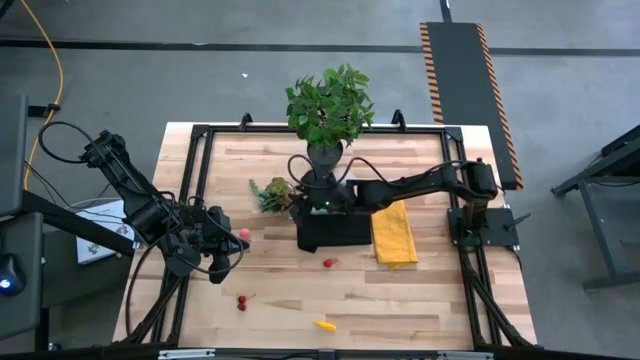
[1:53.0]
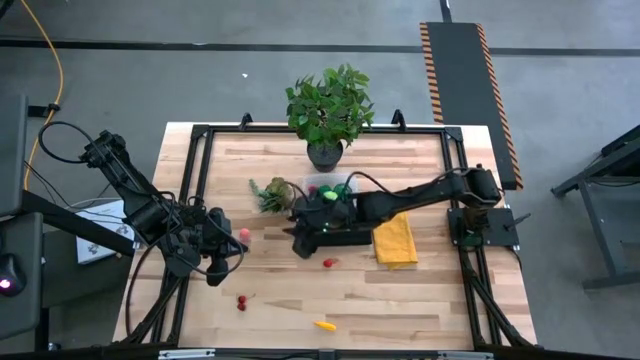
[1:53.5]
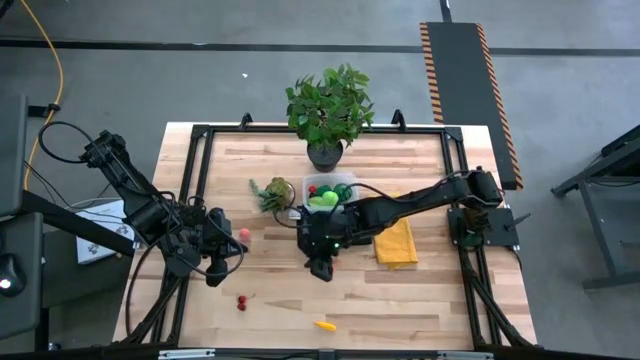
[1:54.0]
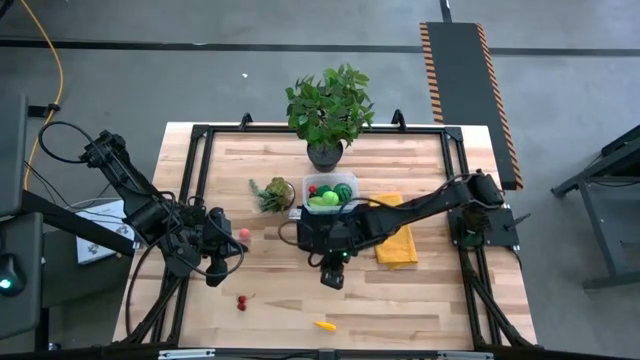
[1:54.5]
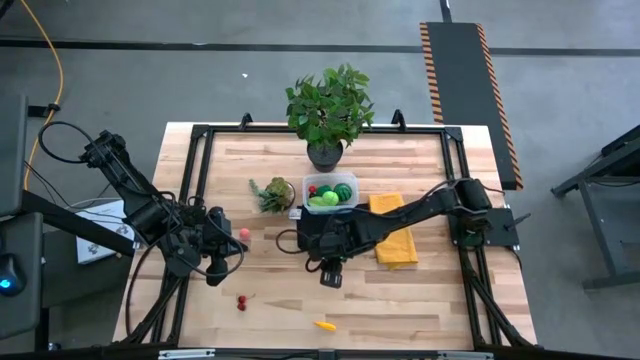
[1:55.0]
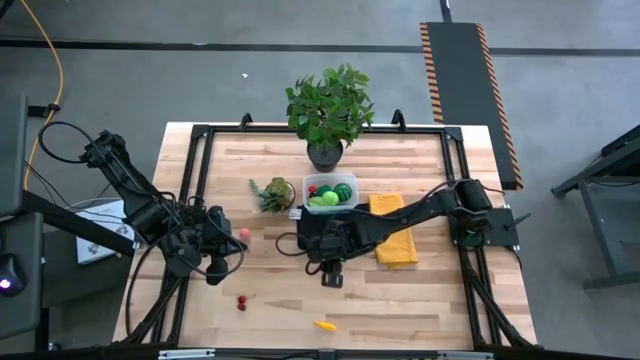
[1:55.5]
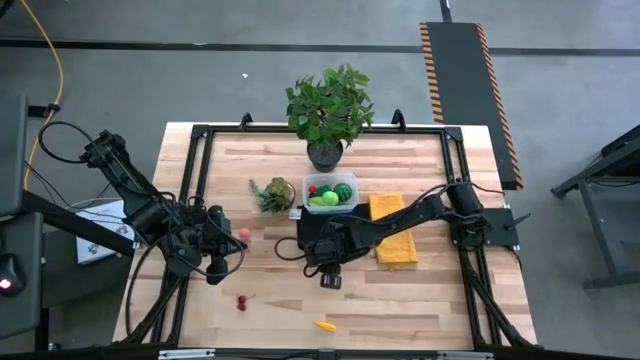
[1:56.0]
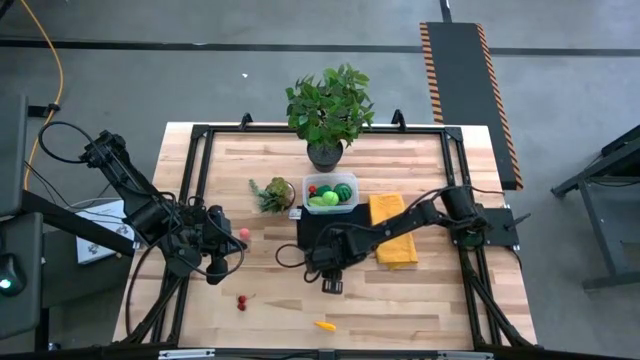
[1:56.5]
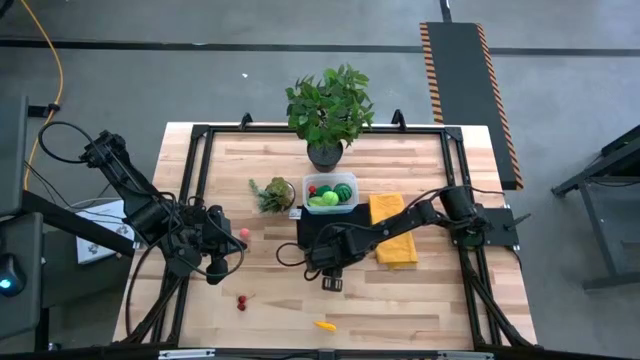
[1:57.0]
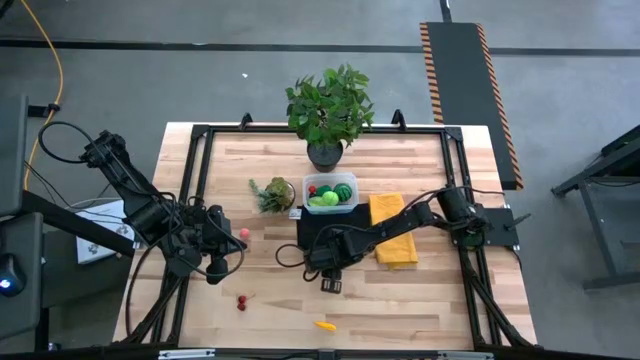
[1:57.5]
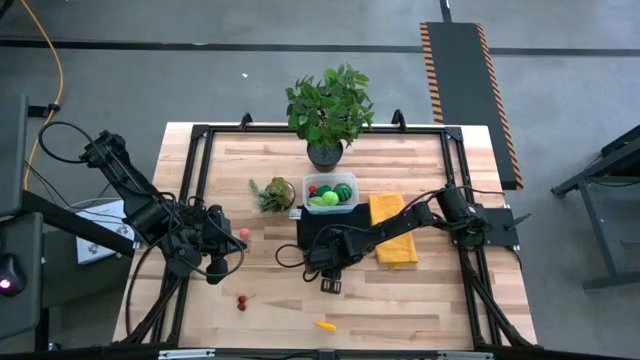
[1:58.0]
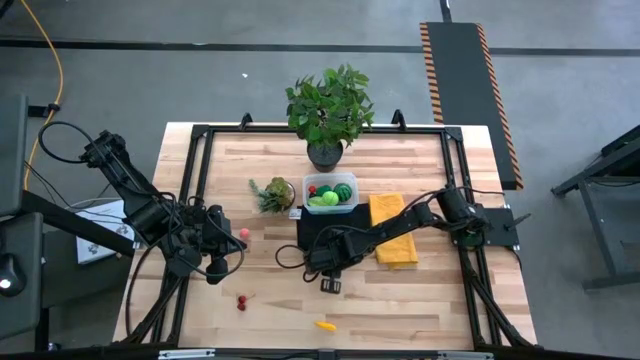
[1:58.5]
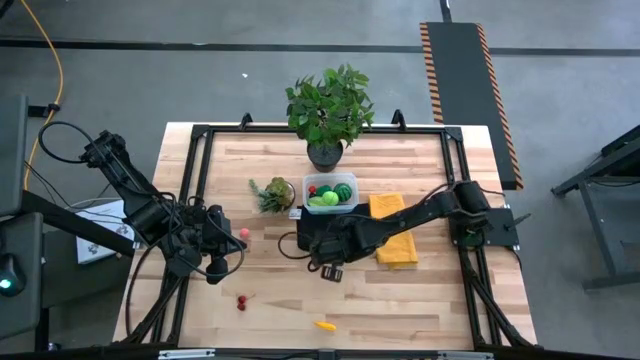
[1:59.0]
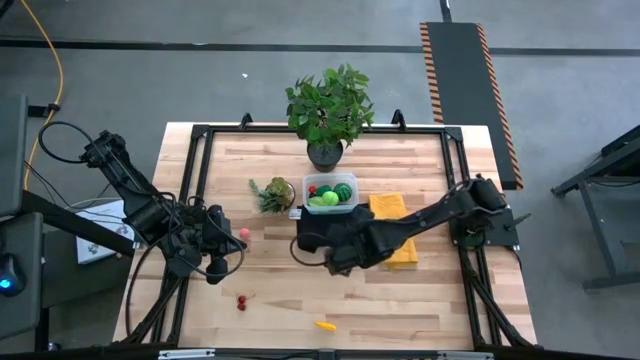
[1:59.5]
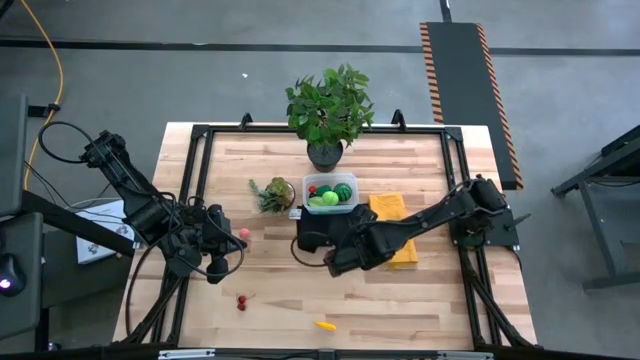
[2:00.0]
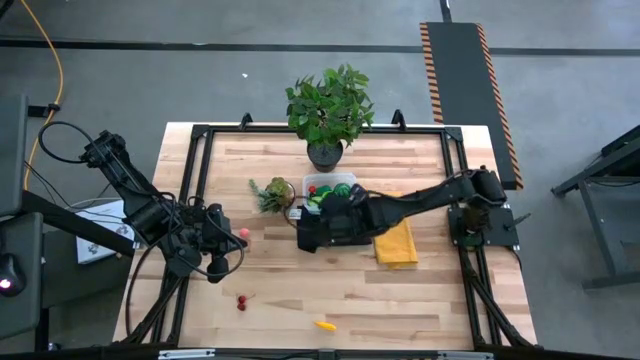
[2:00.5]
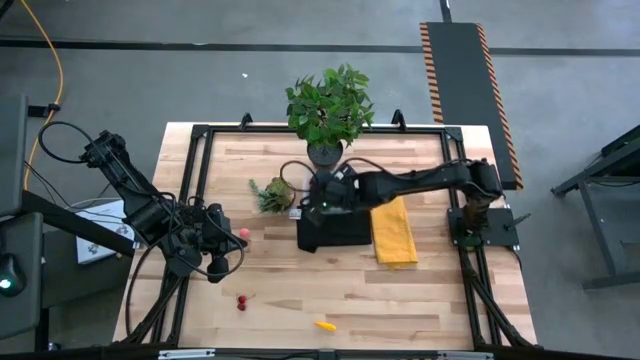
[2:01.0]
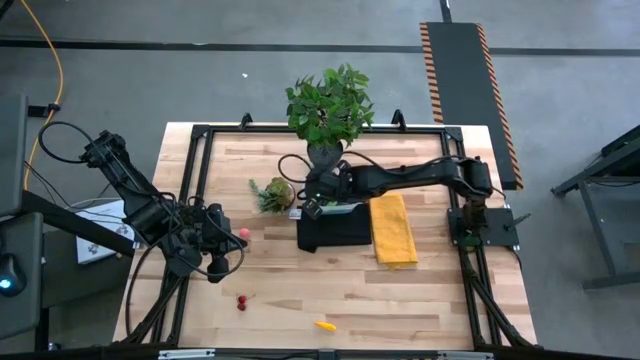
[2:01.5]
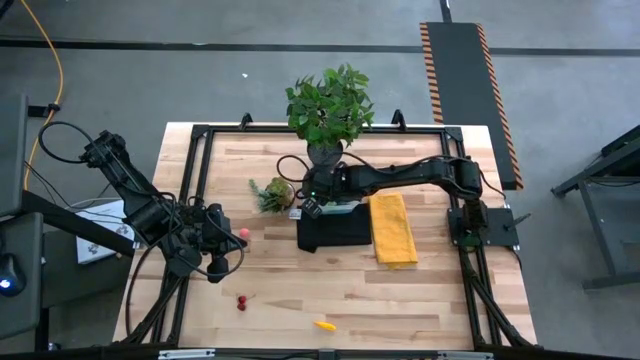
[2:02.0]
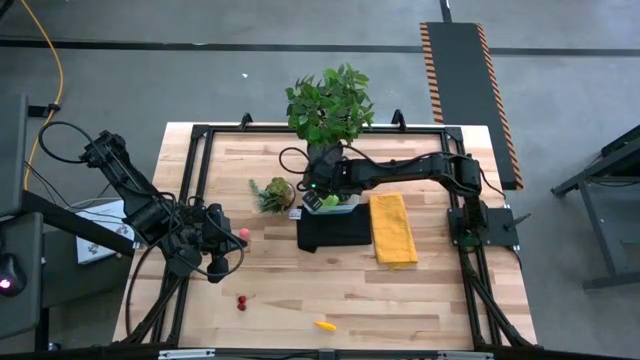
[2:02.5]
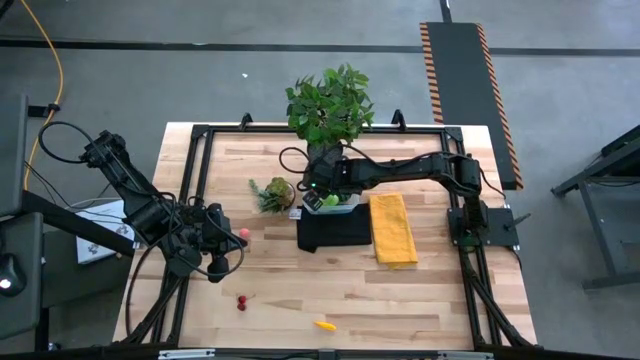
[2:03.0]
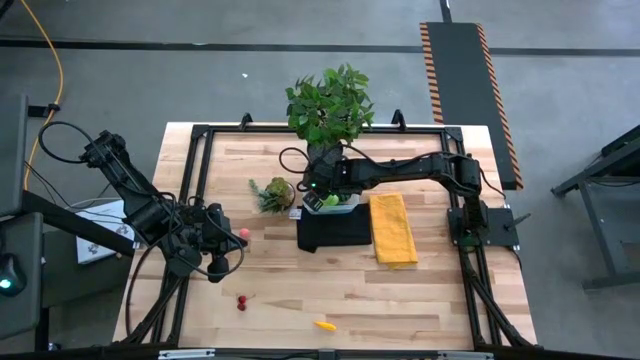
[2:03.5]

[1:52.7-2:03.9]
Task: Pick and placing Produce into tupperware
Put the raspberry into the transparent bin

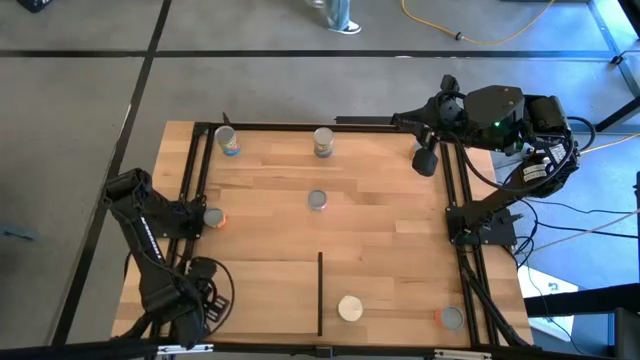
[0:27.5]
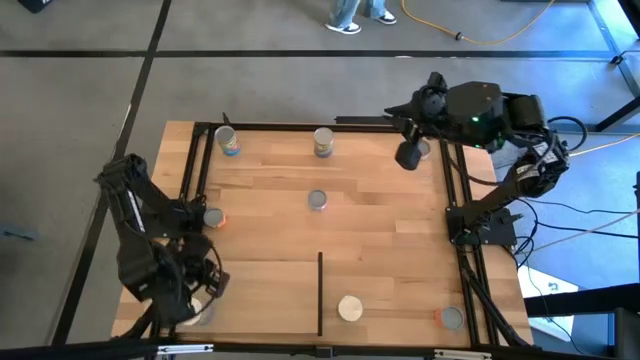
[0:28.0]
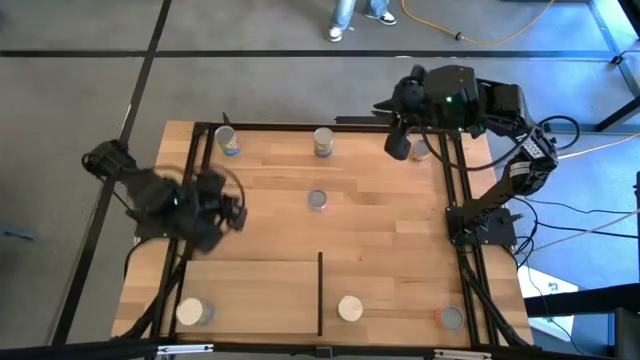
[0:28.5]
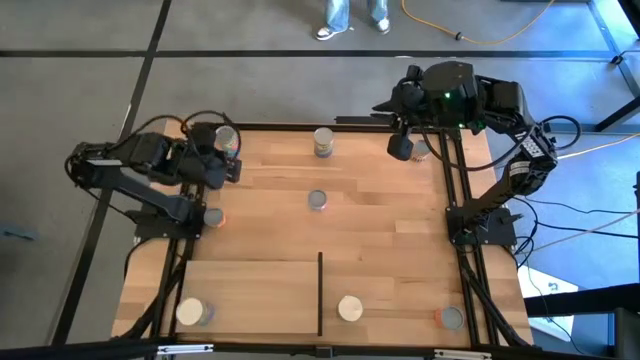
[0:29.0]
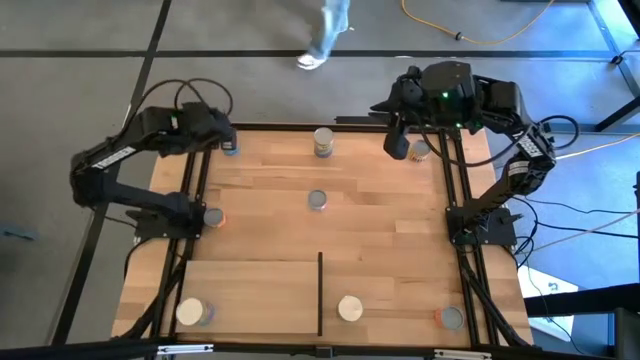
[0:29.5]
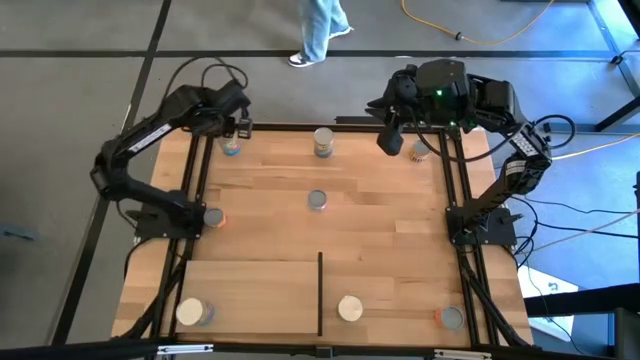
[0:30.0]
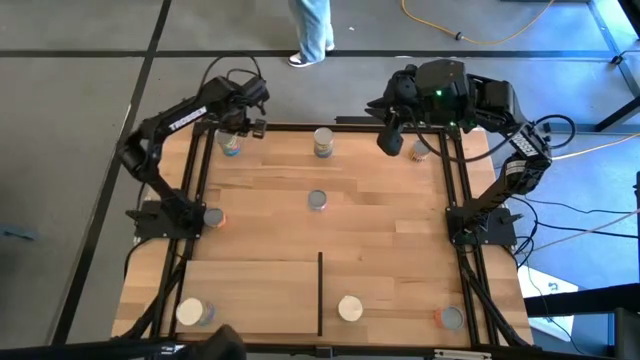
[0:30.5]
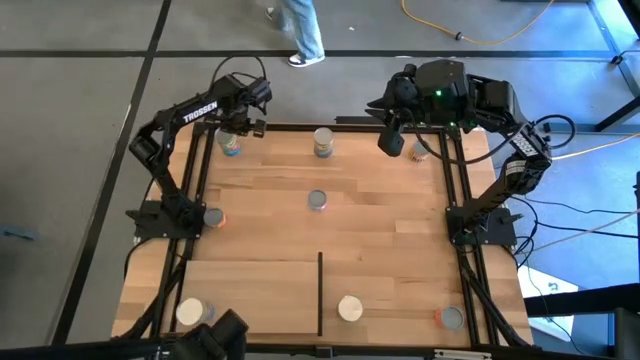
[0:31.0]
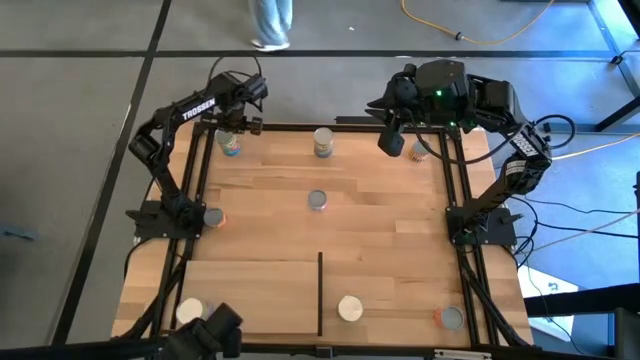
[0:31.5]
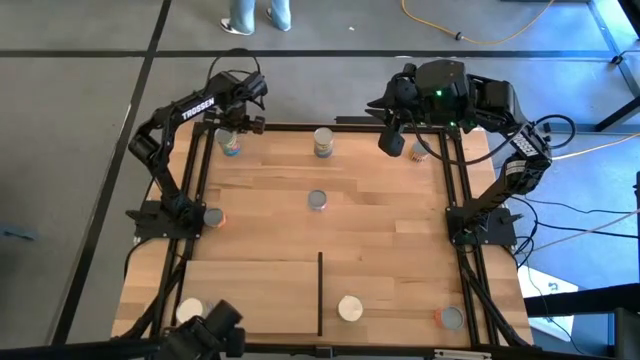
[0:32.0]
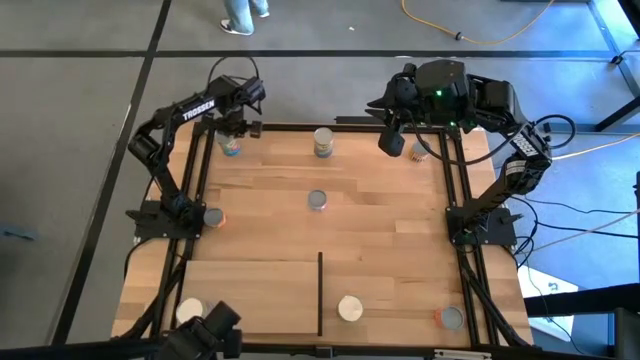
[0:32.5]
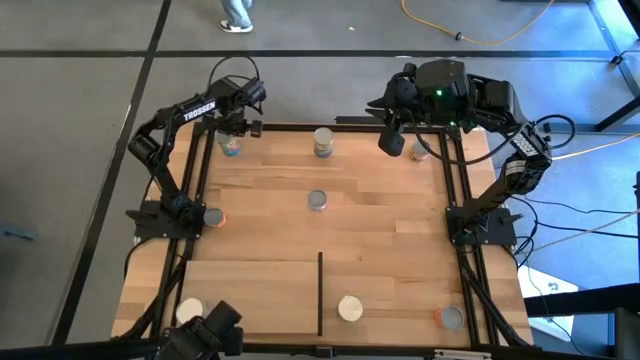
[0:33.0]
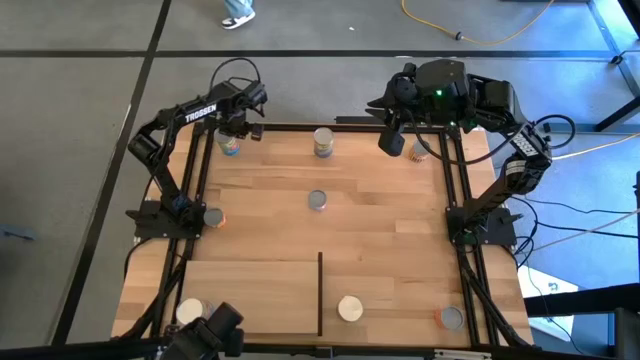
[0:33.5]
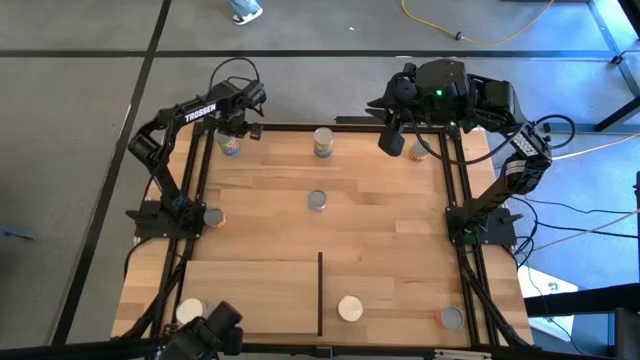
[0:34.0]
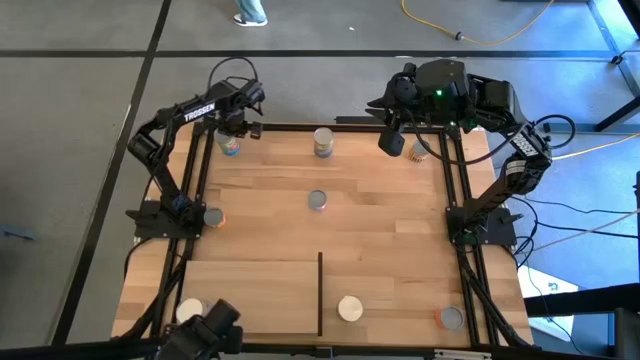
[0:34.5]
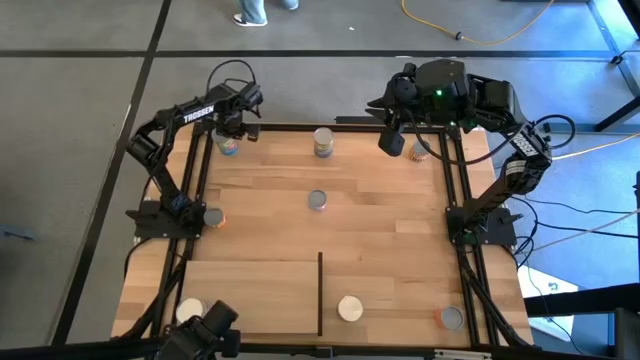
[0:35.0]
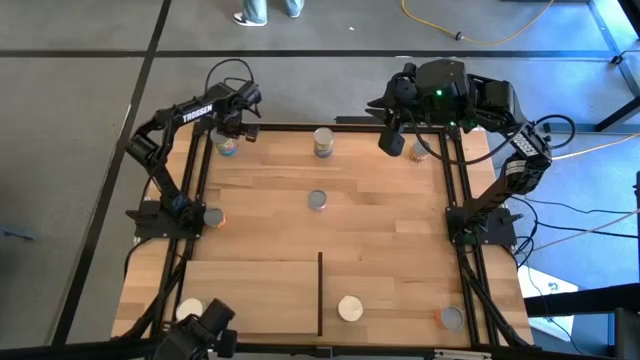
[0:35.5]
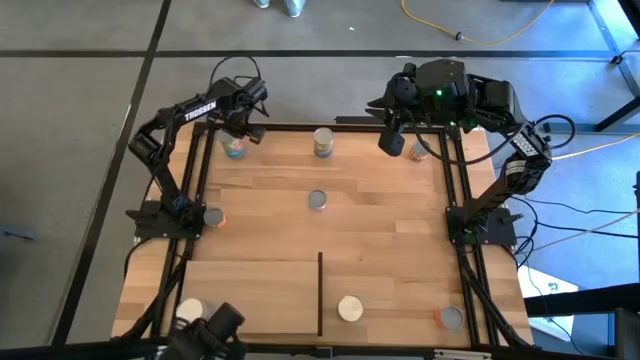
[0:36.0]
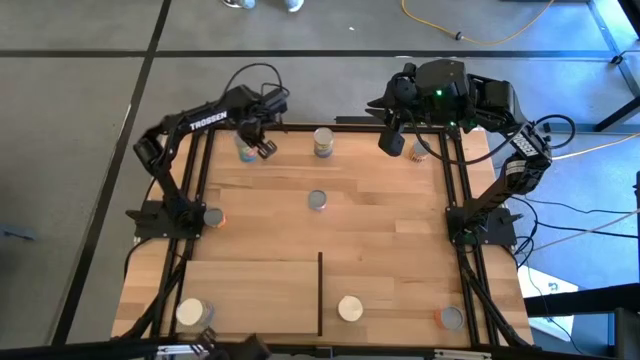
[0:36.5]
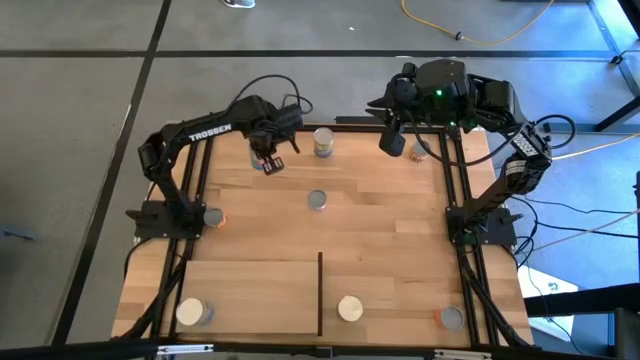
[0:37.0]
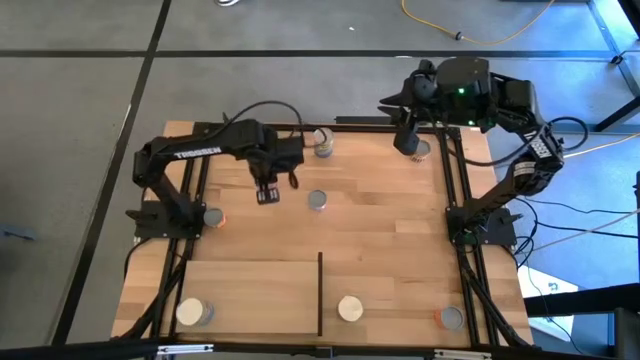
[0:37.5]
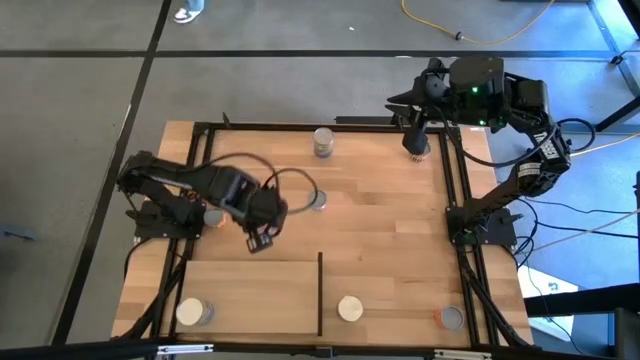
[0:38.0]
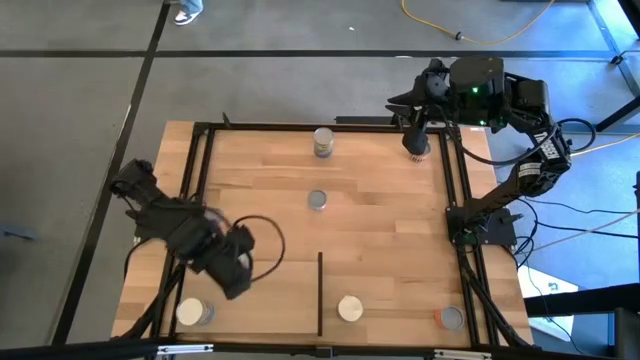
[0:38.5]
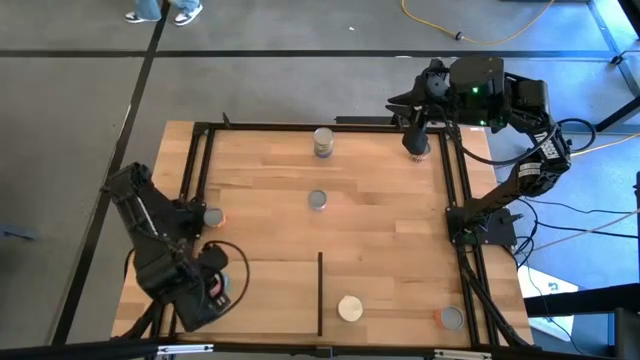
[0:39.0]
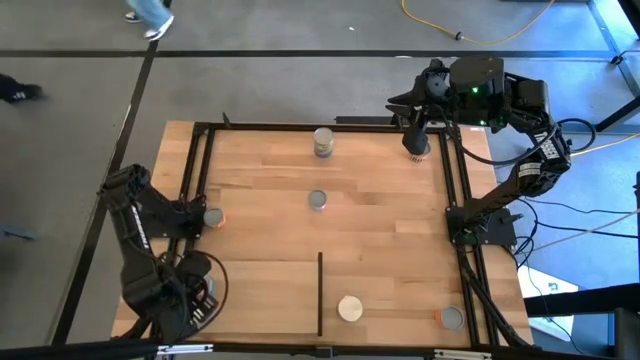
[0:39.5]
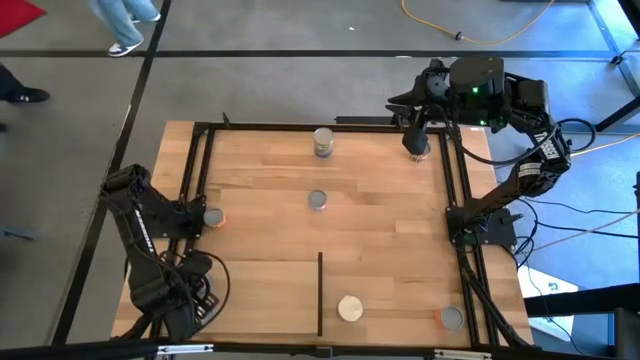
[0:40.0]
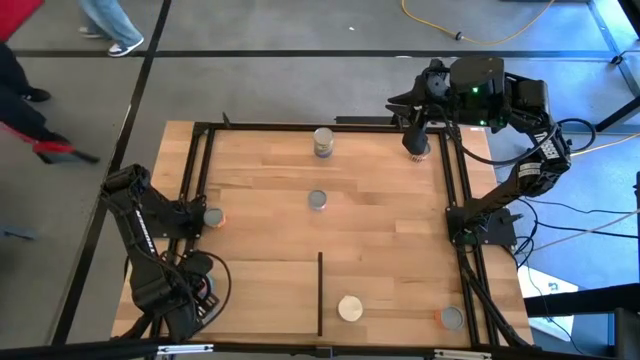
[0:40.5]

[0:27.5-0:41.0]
Task: Pick and place cans onto a shelf
Put the canned tomatoes on the shelf aligned with the other canned tomatoes
